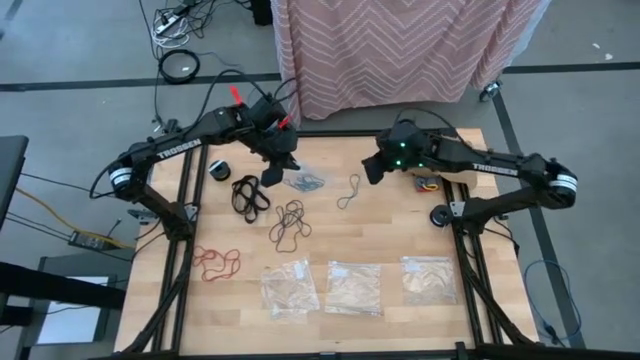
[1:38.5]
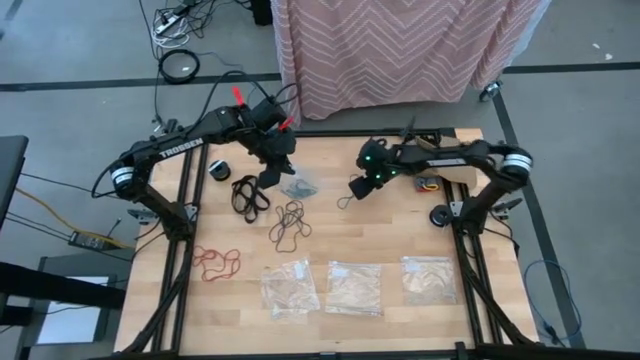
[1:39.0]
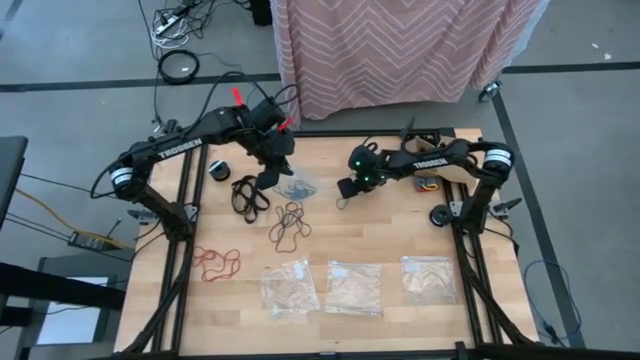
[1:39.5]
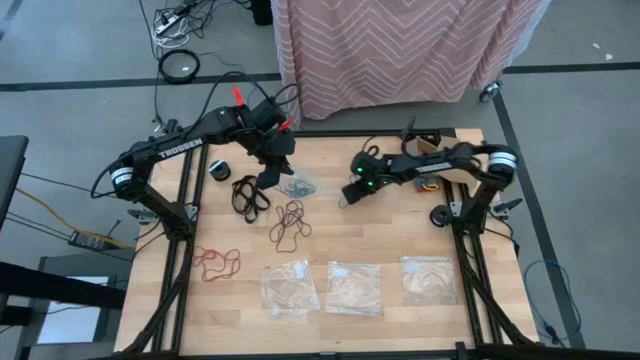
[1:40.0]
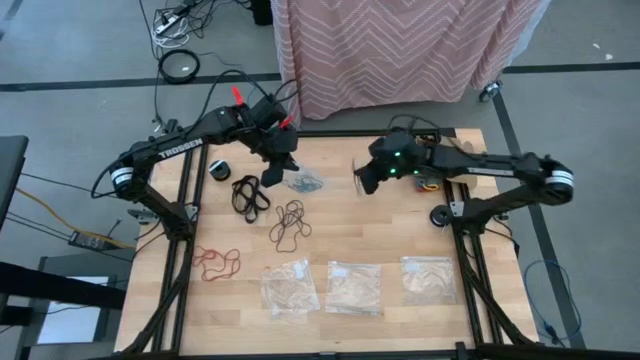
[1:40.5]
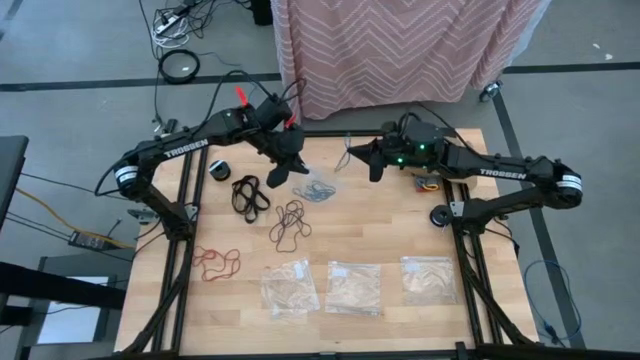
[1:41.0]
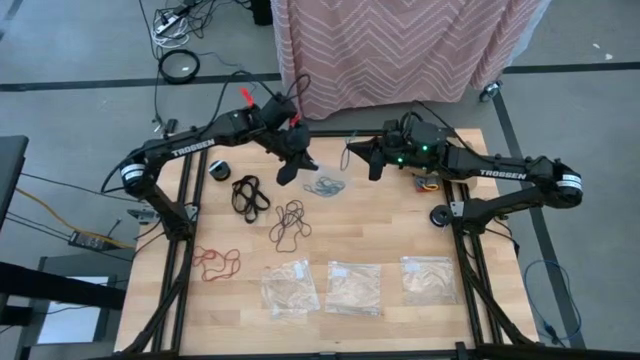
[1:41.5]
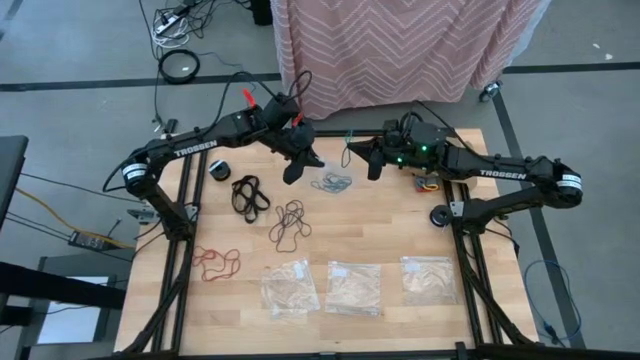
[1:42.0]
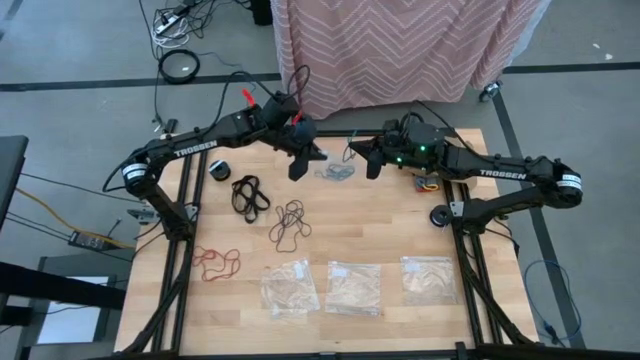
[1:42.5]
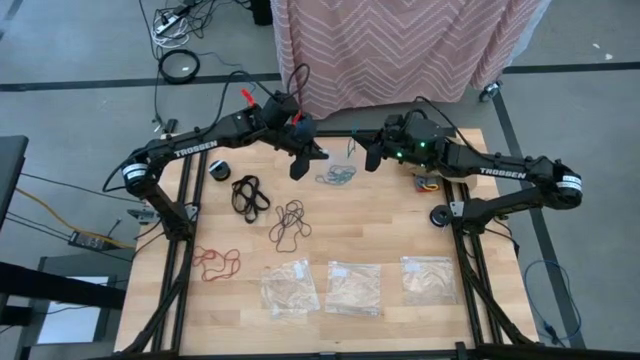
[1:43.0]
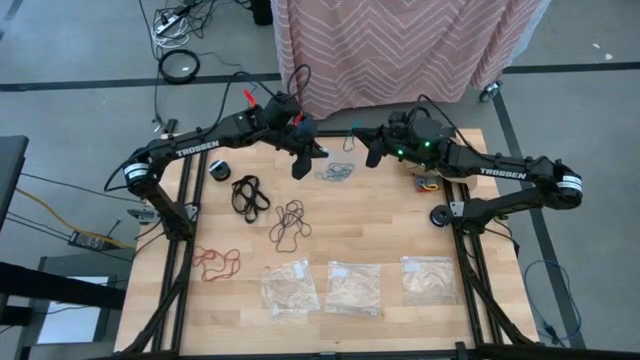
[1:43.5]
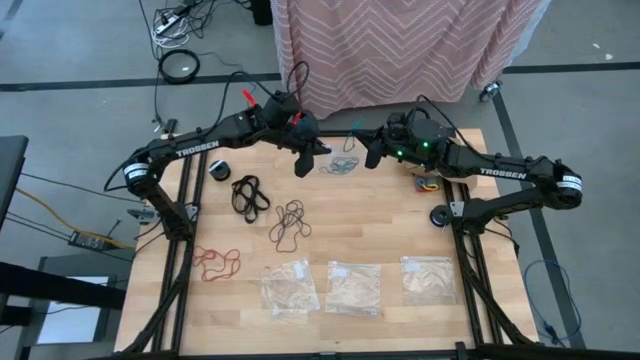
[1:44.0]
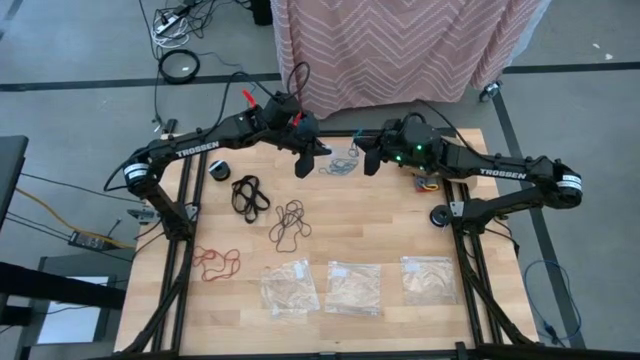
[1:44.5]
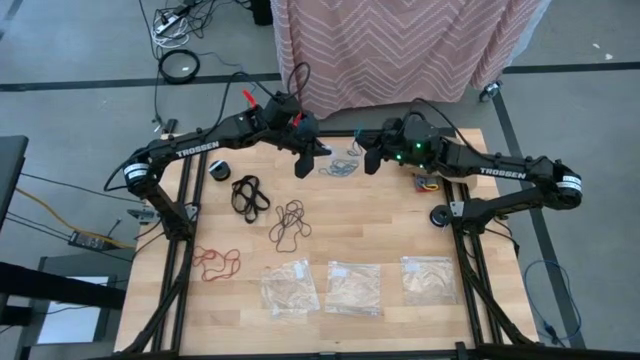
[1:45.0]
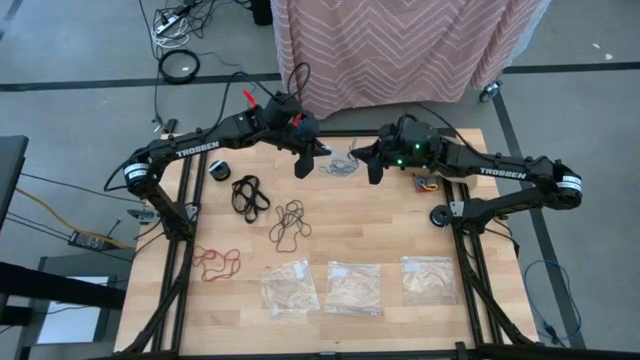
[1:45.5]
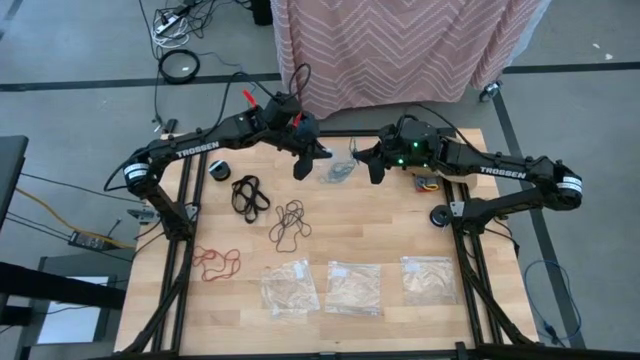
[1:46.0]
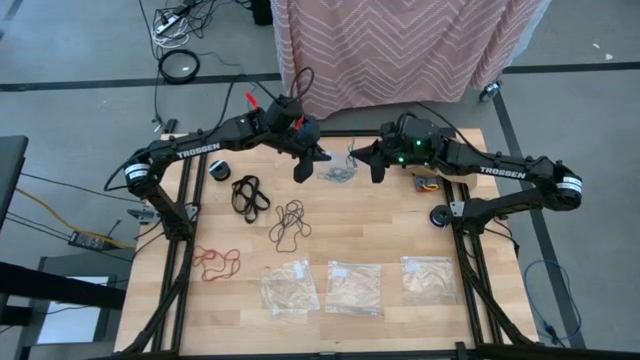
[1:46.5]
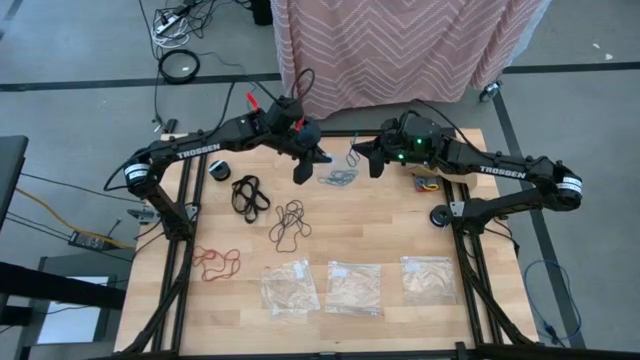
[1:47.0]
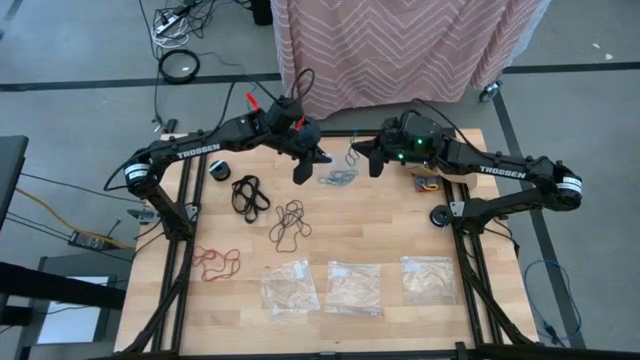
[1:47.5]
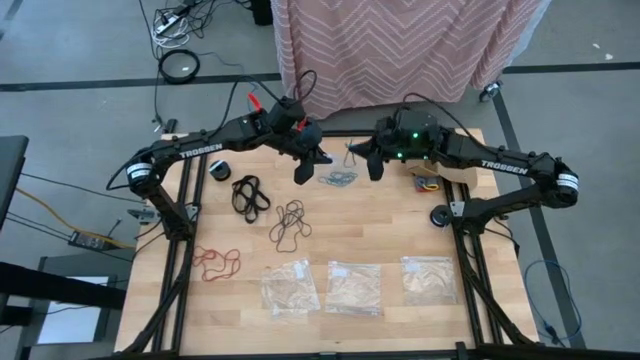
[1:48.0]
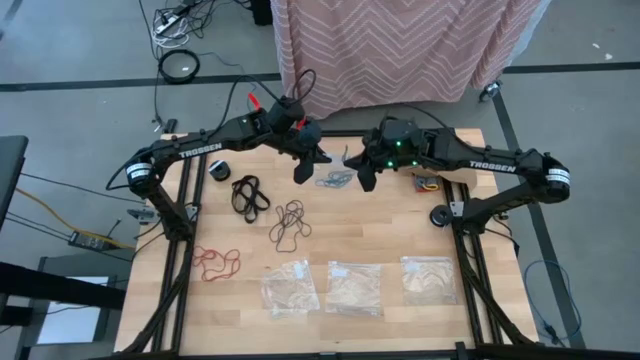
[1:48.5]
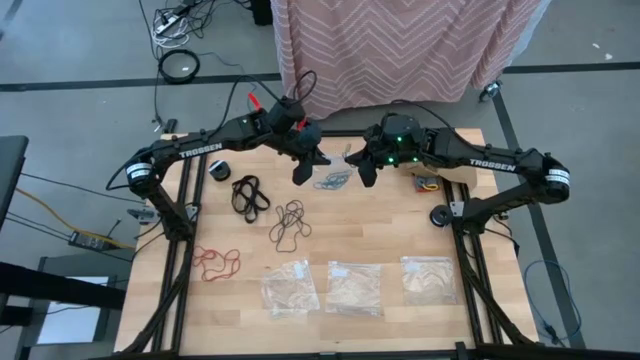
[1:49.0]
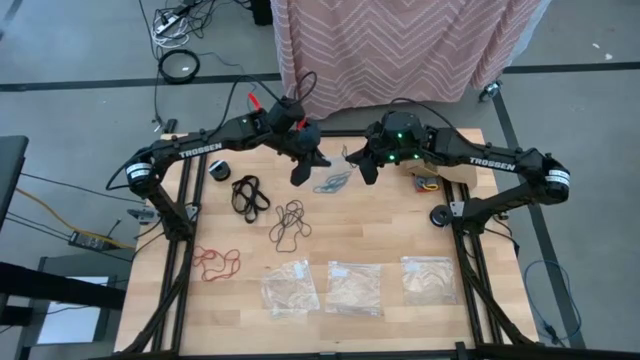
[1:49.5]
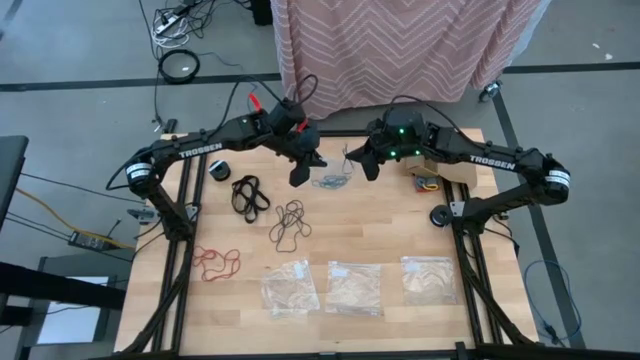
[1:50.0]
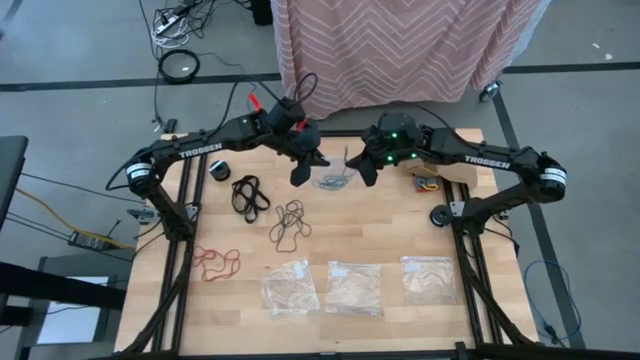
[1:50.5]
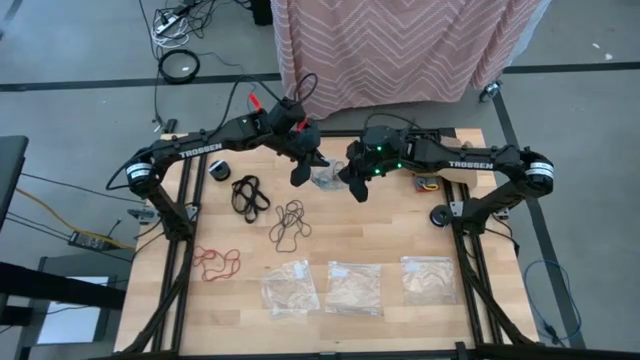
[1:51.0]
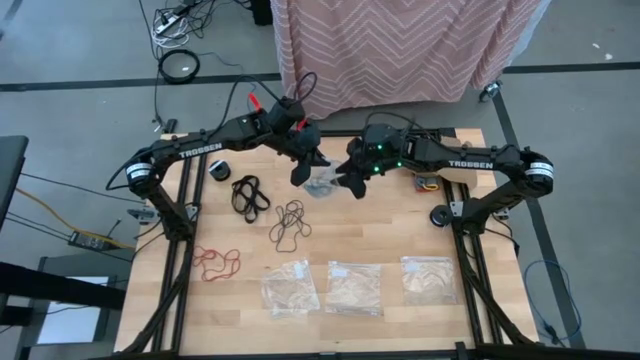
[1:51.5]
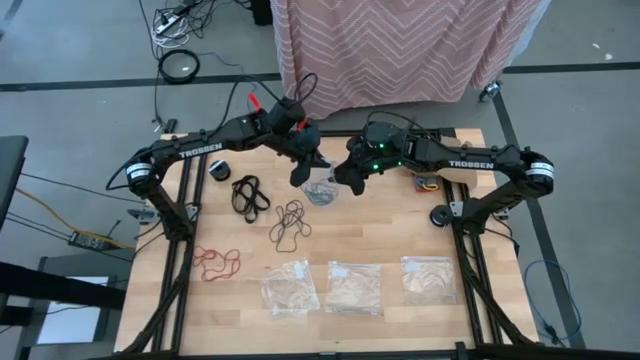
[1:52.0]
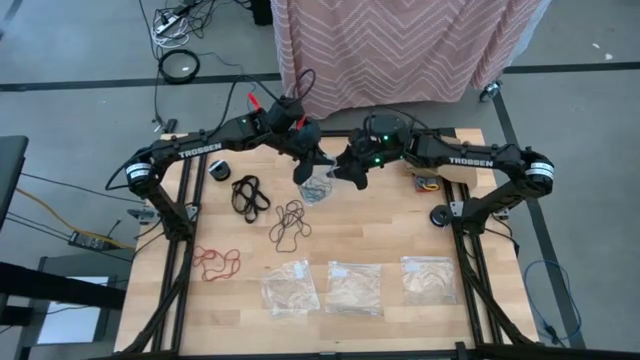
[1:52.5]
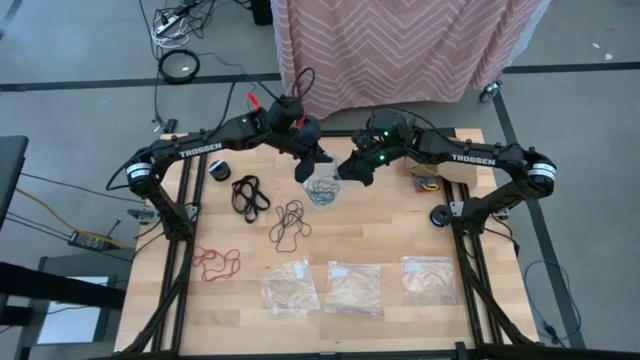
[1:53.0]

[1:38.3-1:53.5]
Task: Sort rubber bands
Put the blue rubber band into the top transparent zip bag

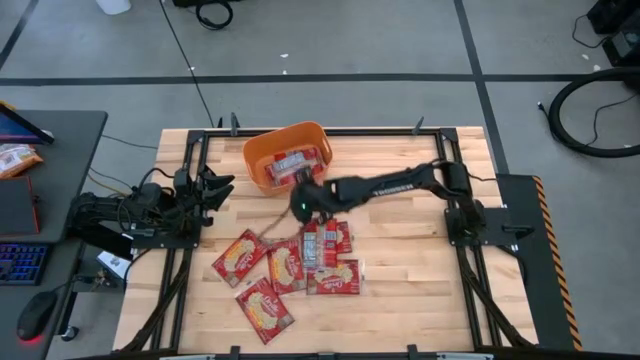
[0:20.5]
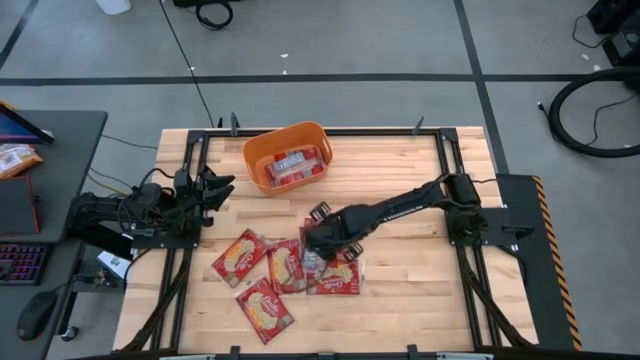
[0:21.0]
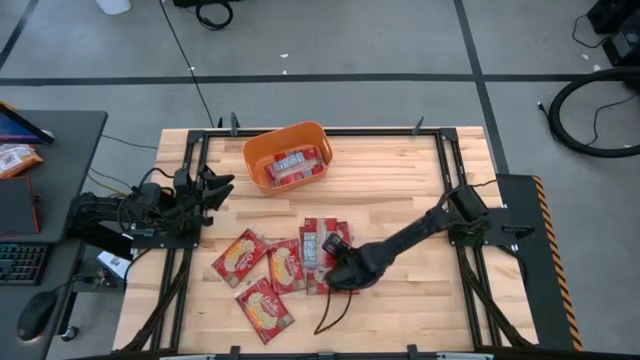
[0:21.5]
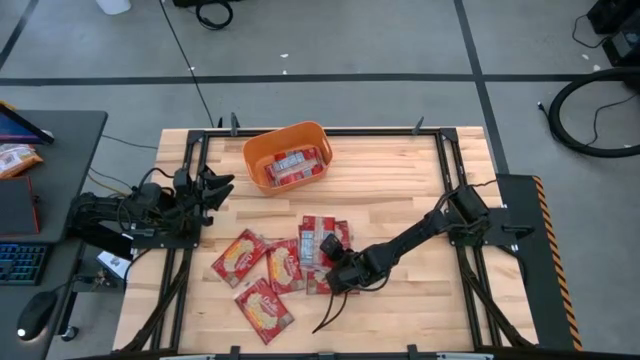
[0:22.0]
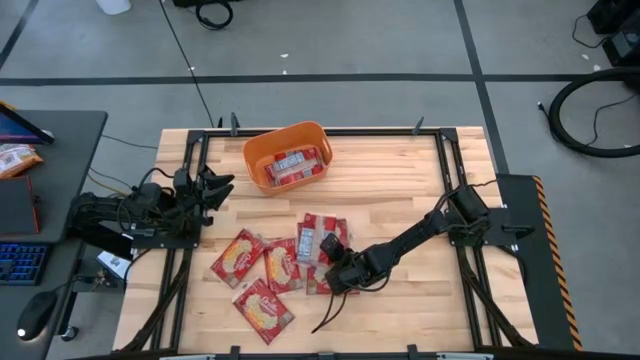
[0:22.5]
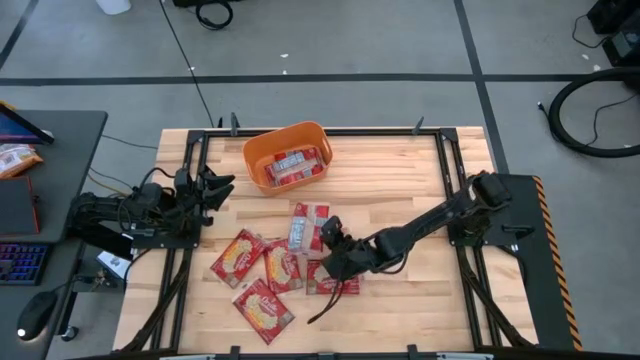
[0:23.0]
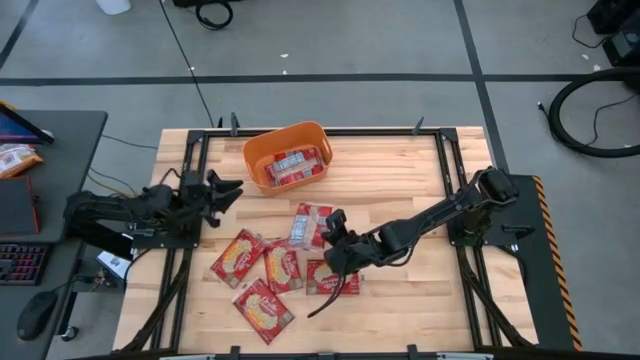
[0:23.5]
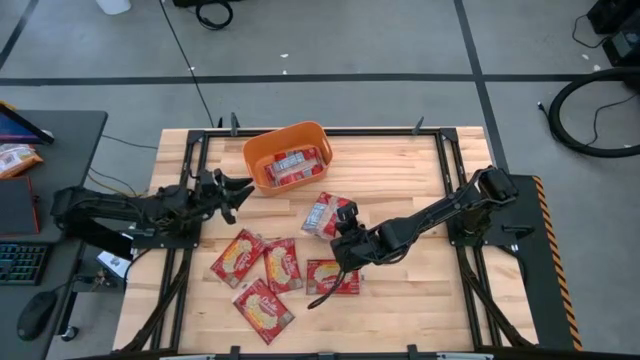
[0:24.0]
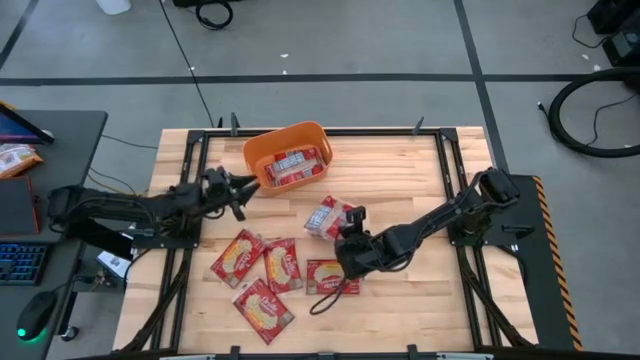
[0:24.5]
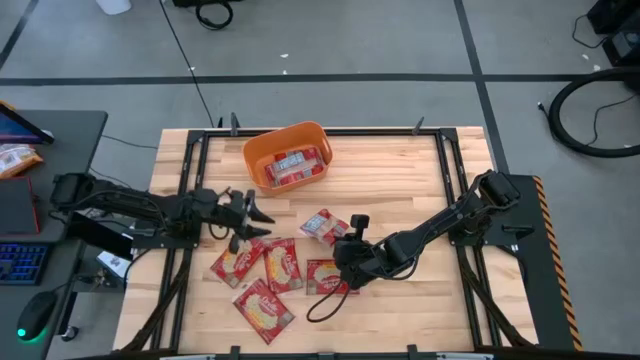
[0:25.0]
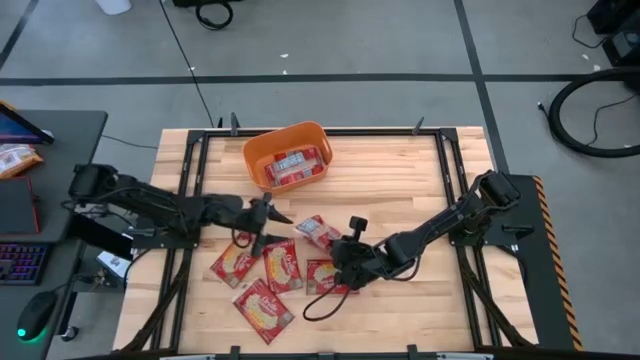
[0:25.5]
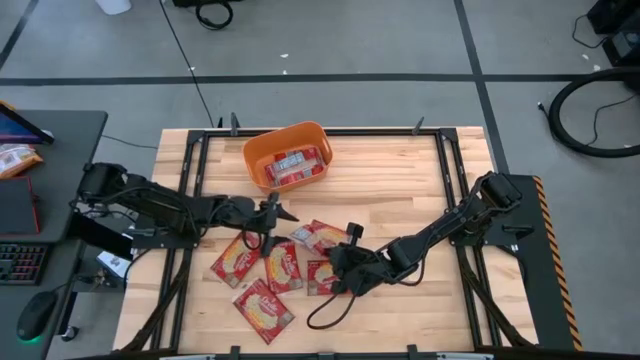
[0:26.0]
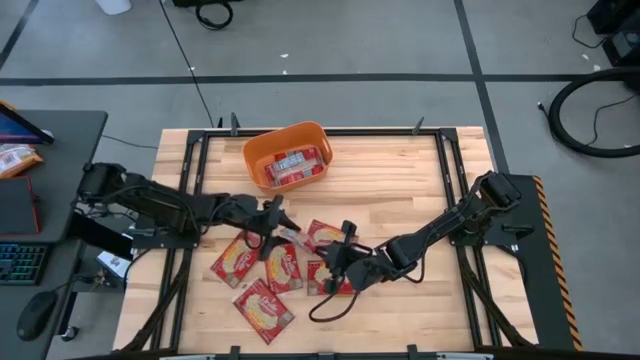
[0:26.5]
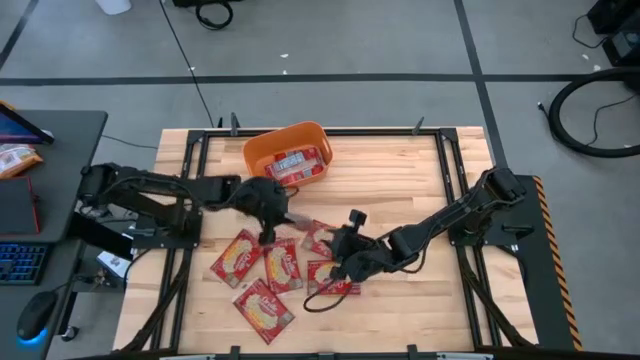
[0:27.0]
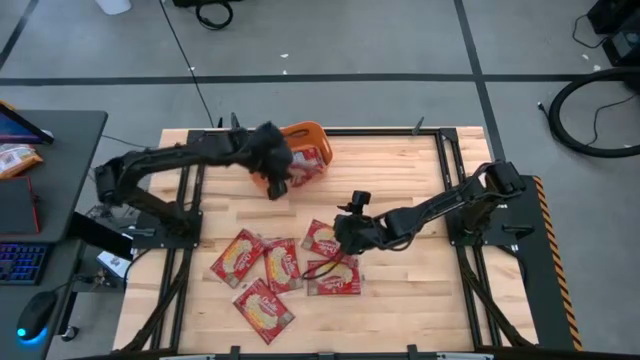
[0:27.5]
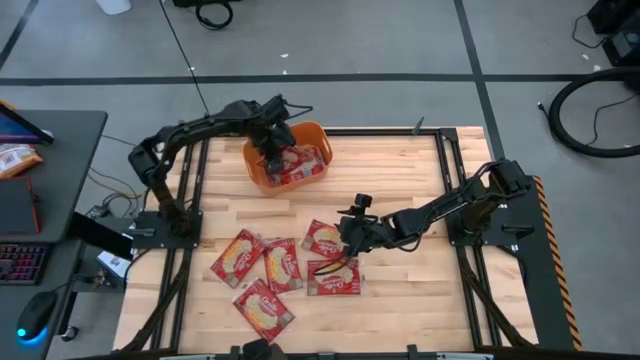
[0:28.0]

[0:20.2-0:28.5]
Task: Sort popcorn bags into baskets
Put the red popcorn bag into the orange bin
